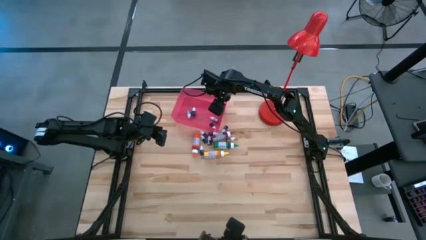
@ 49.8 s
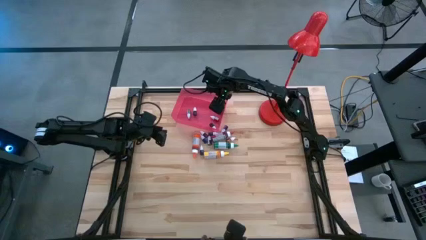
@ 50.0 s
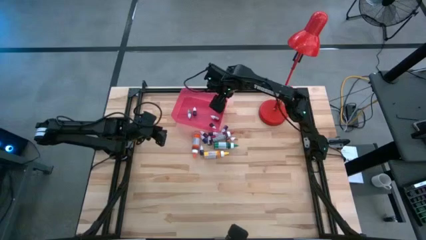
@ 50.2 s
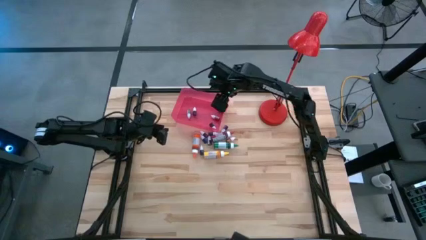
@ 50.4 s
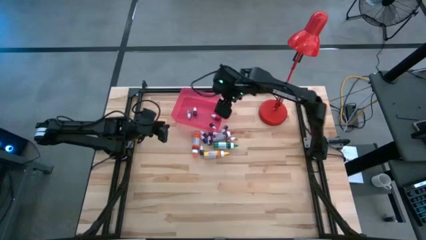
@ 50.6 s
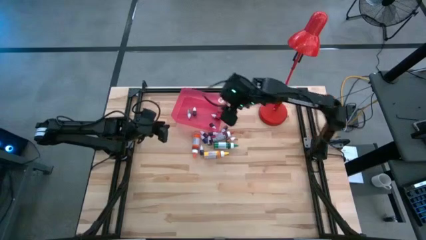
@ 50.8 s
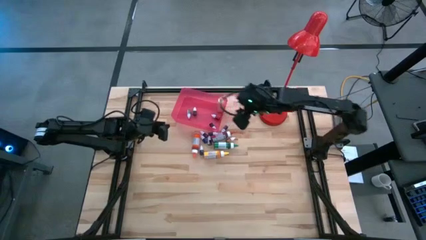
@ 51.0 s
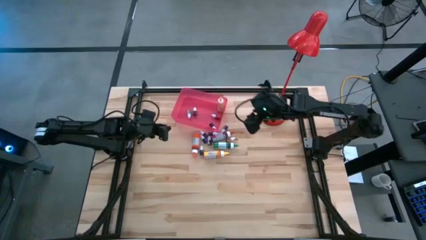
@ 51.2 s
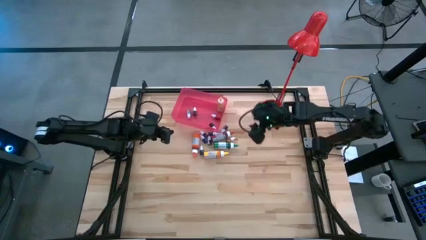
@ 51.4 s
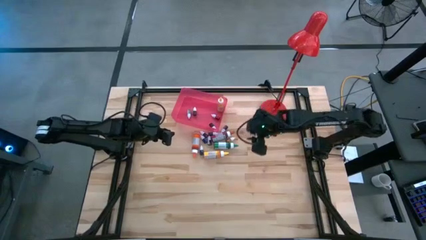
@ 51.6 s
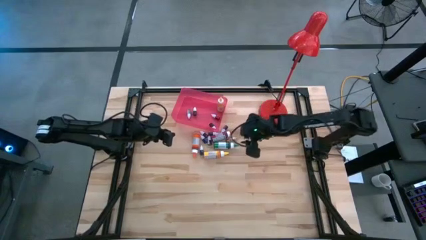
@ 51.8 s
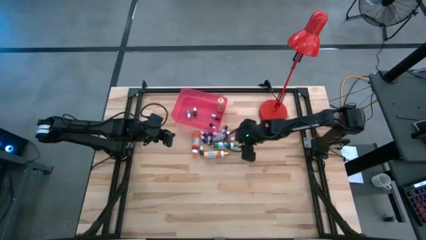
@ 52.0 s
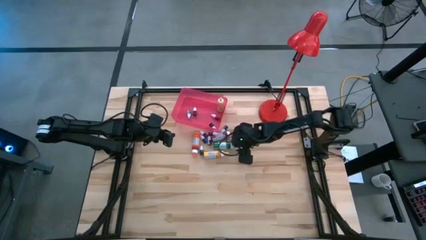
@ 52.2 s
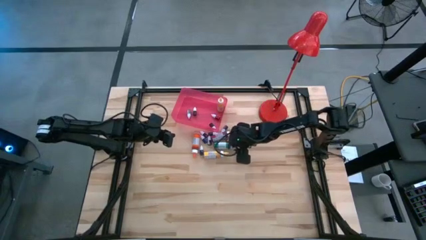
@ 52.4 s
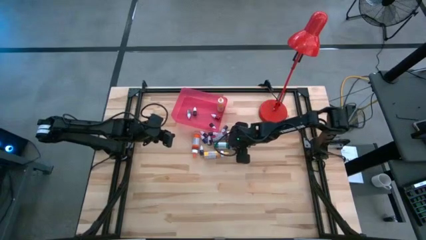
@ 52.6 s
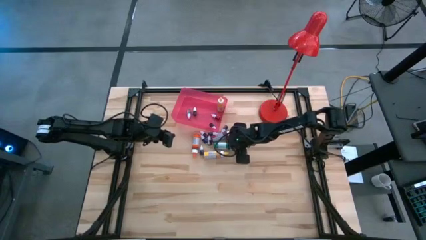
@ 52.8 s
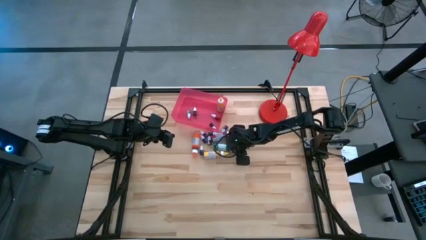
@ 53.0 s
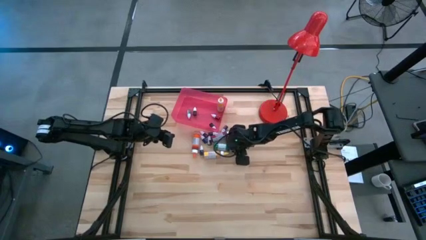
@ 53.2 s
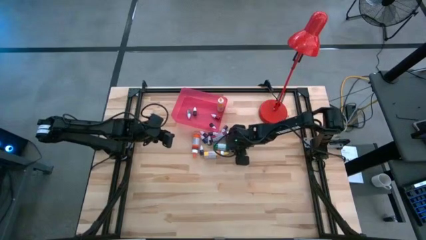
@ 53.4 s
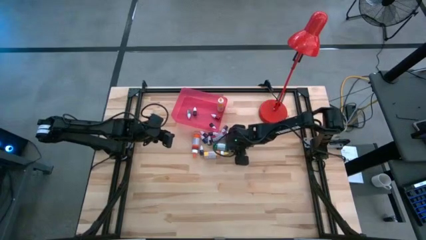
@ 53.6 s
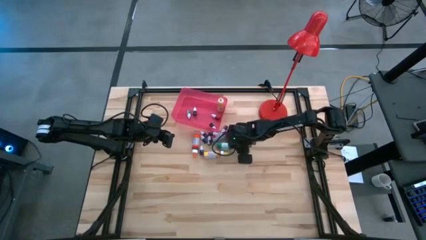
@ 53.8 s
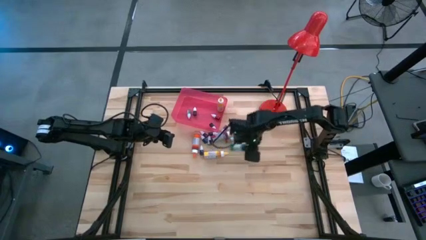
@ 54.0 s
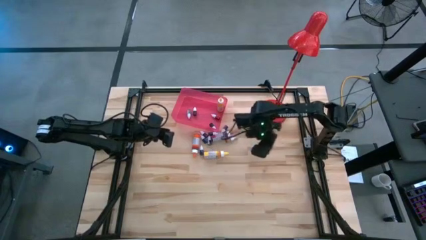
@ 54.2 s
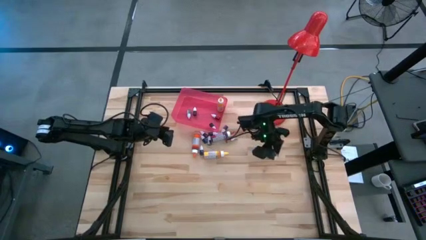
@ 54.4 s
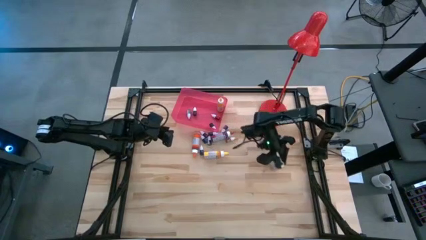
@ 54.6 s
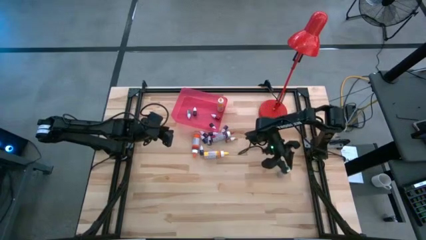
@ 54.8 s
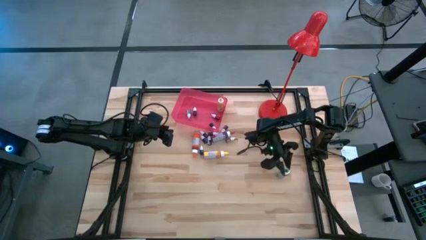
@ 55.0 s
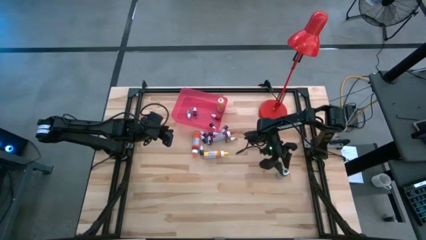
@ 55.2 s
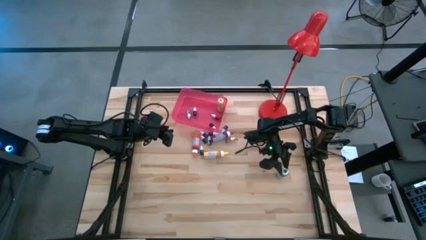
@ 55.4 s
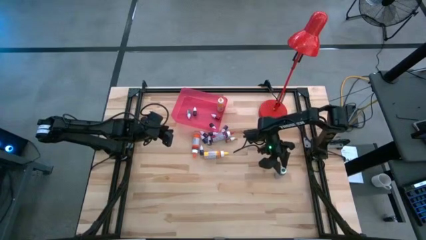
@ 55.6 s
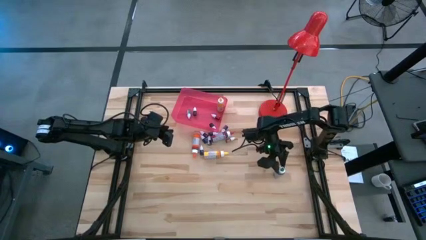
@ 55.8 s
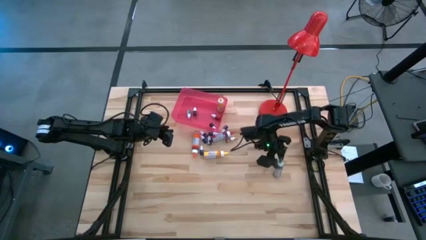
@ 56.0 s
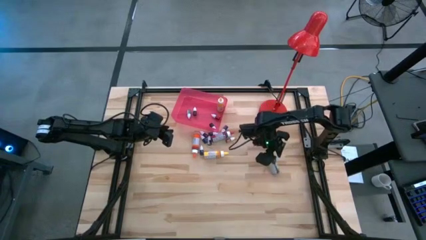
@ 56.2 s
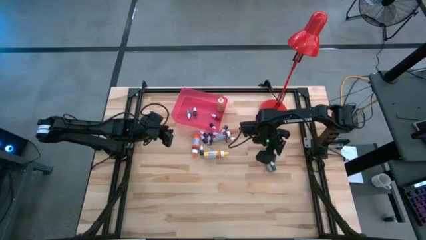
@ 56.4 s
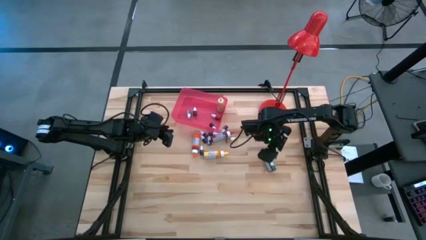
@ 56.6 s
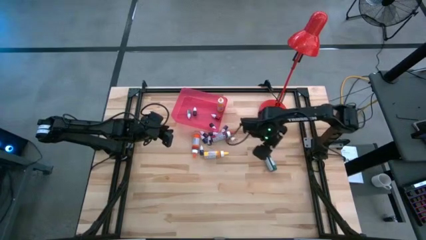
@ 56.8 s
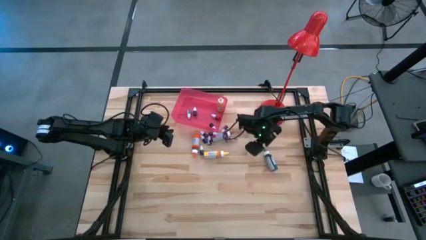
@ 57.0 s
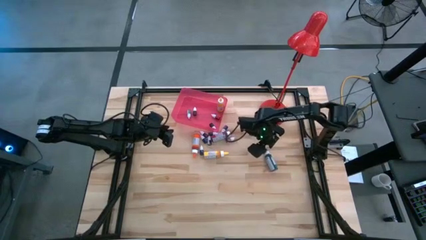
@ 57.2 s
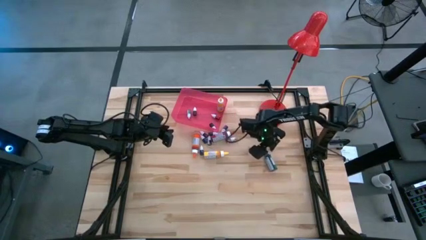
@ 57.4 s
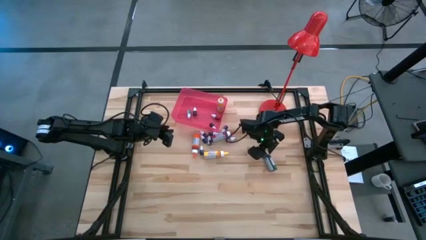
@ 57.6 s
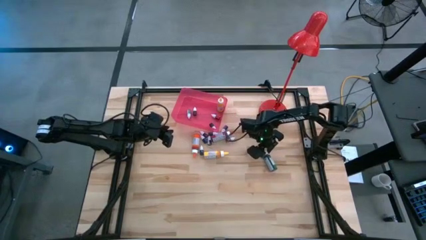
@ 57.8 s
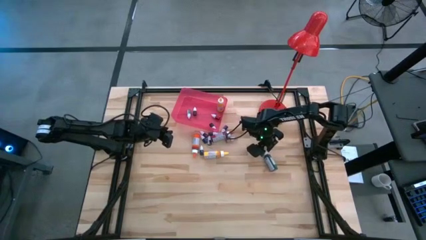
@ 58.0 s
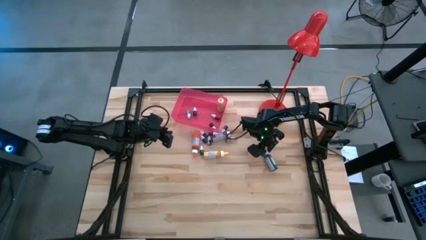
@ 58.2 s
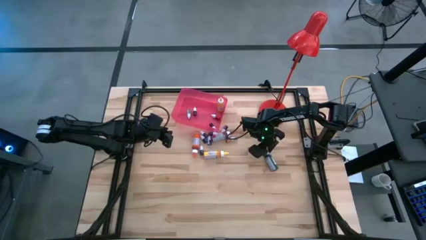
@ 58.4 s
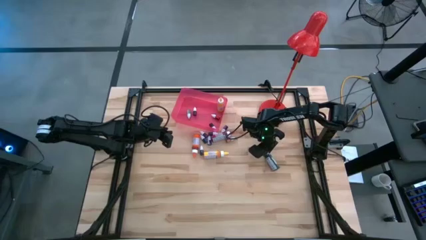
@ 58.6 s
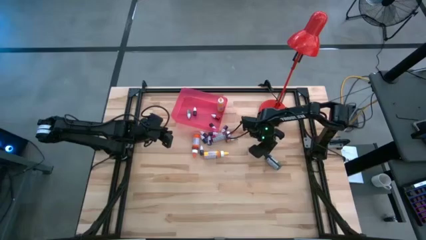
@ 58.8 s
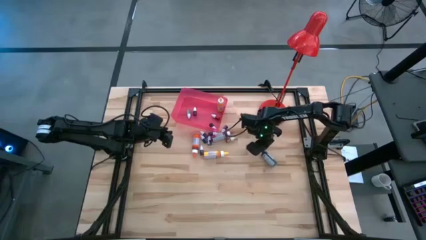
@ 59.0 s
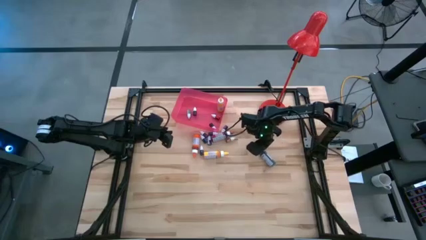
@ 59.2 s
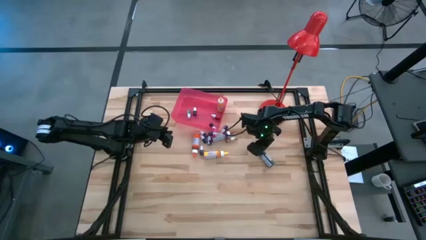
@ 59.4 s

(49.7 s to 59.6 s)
Task: Pick & Place food coloring
Put the big green food coloring bottle into the red bin
